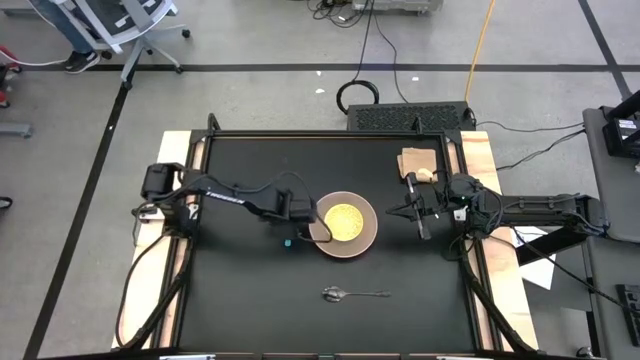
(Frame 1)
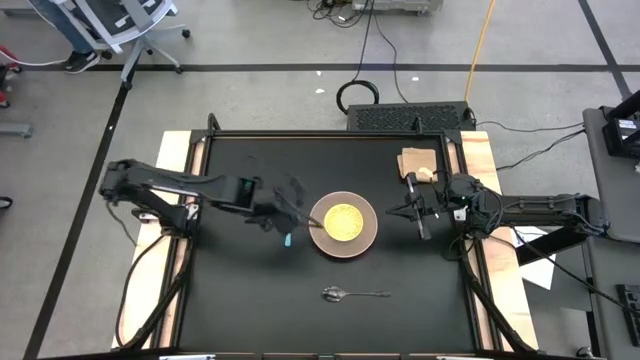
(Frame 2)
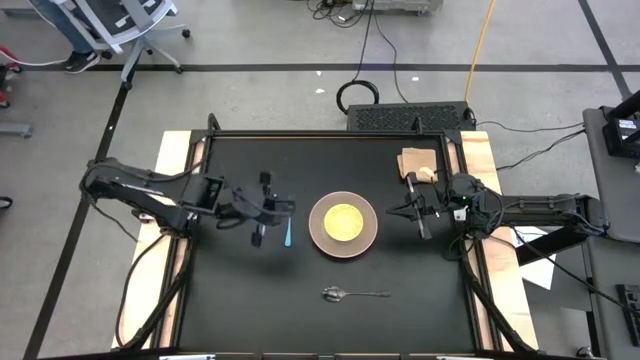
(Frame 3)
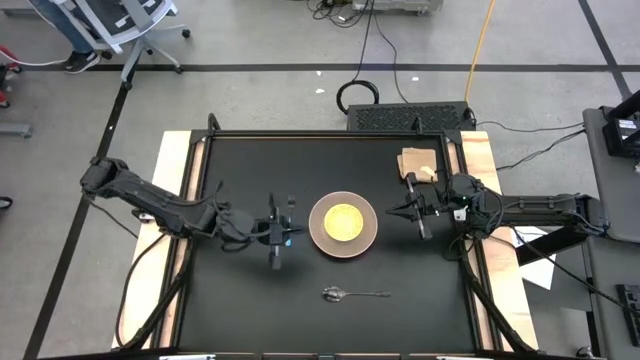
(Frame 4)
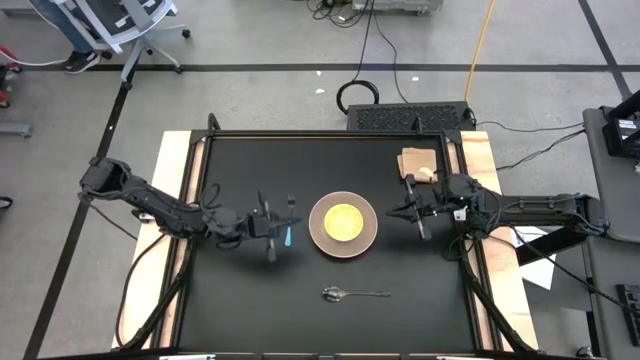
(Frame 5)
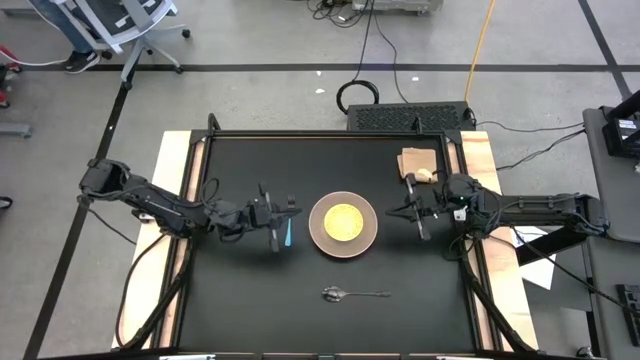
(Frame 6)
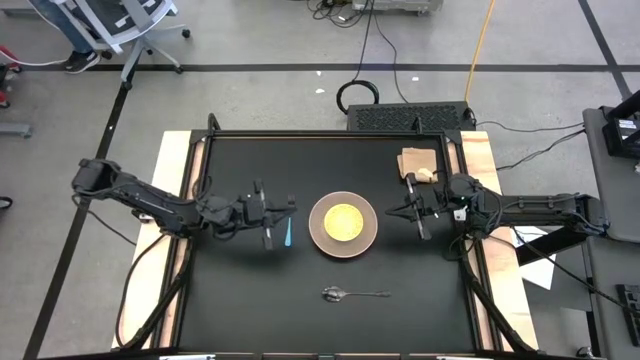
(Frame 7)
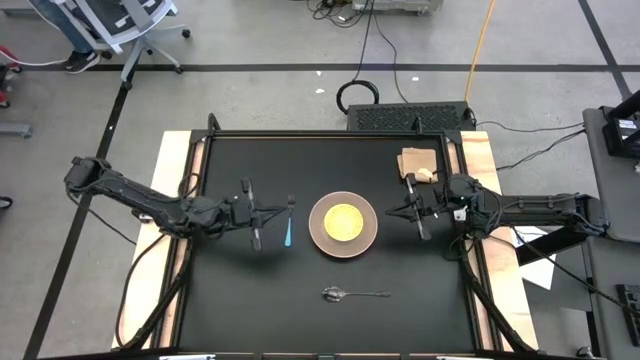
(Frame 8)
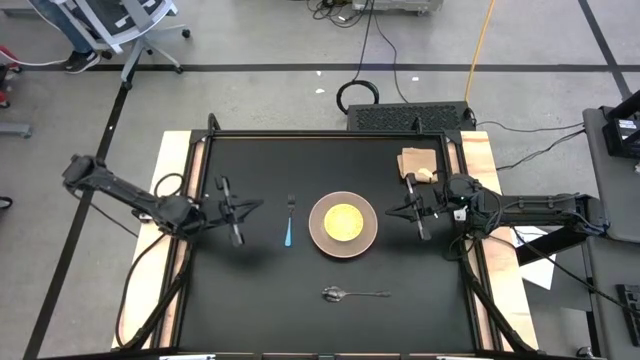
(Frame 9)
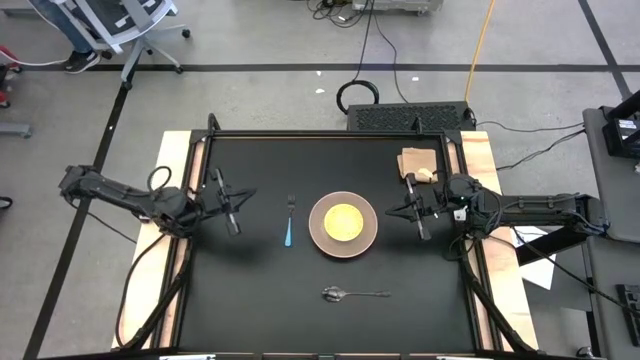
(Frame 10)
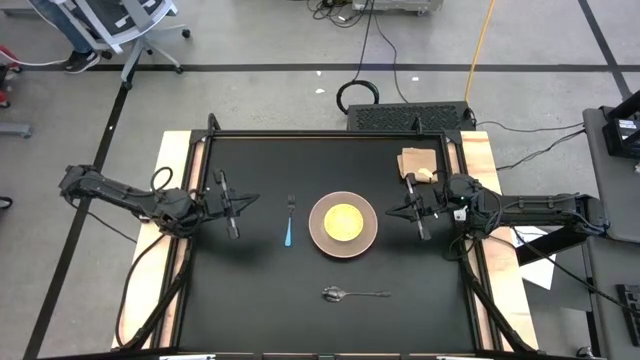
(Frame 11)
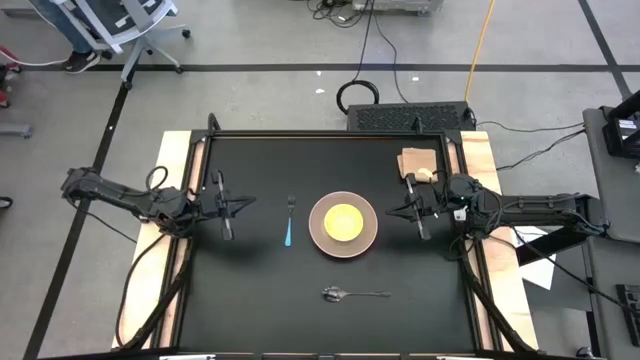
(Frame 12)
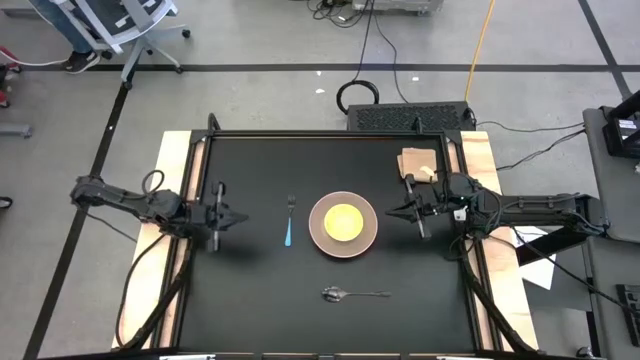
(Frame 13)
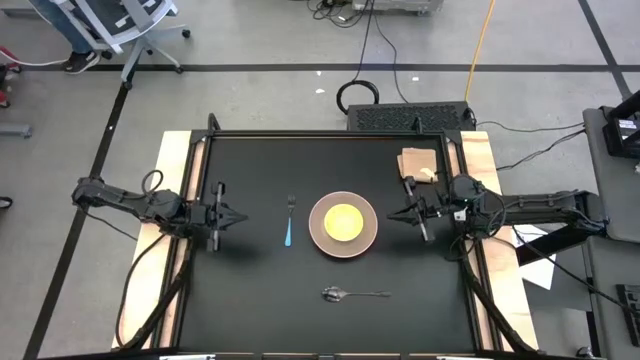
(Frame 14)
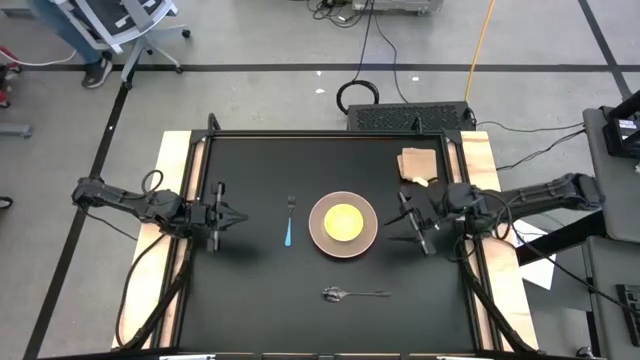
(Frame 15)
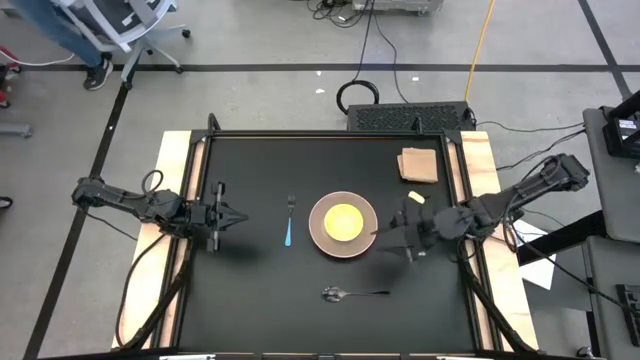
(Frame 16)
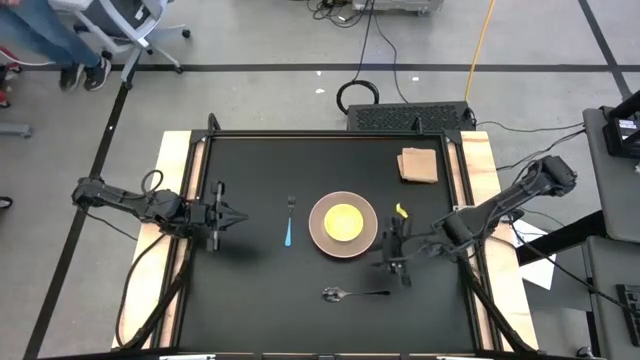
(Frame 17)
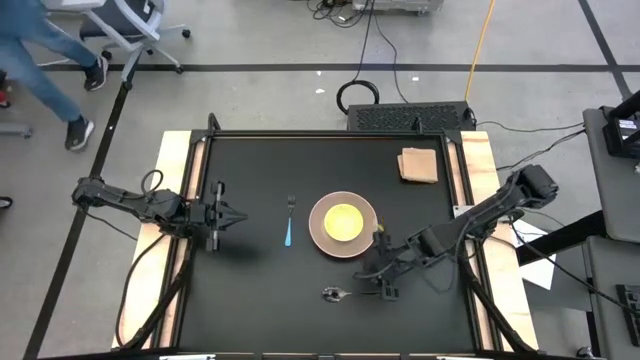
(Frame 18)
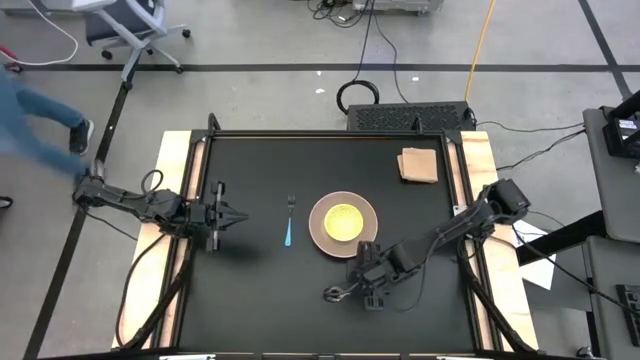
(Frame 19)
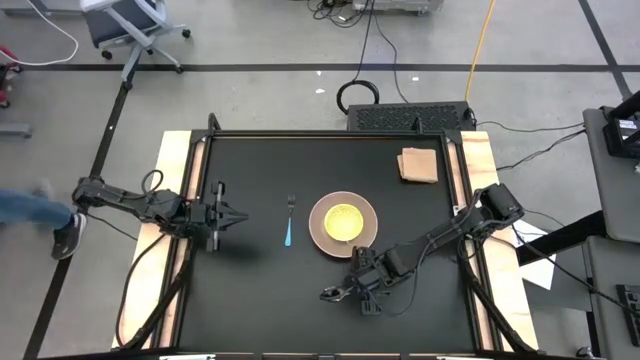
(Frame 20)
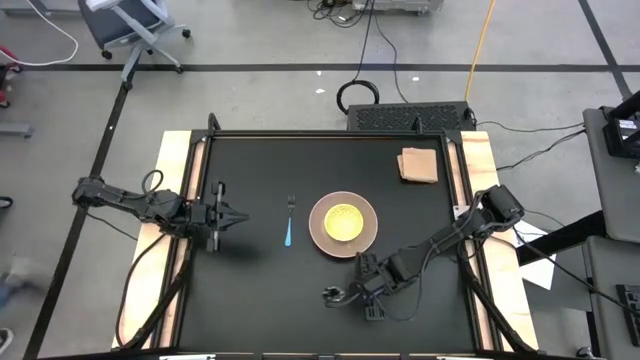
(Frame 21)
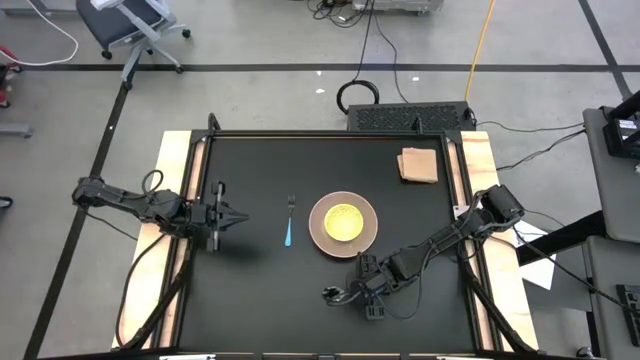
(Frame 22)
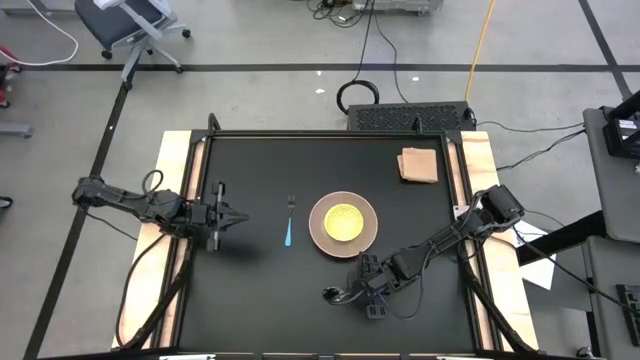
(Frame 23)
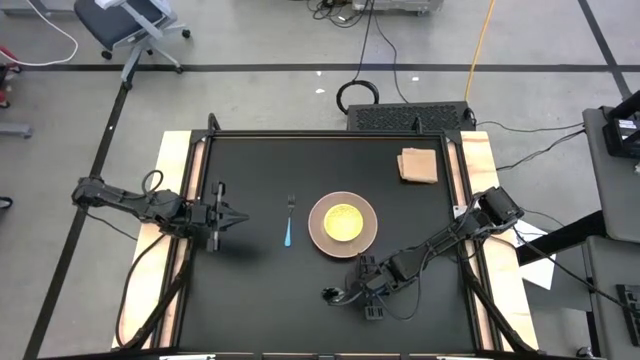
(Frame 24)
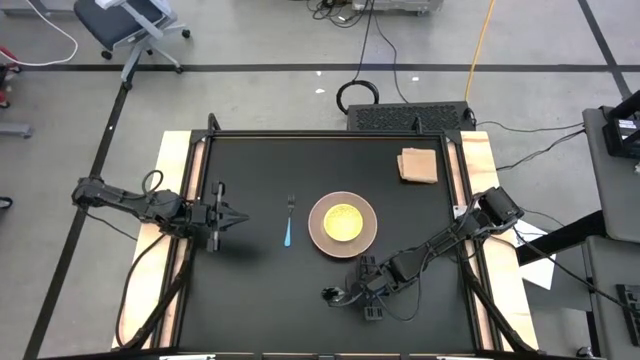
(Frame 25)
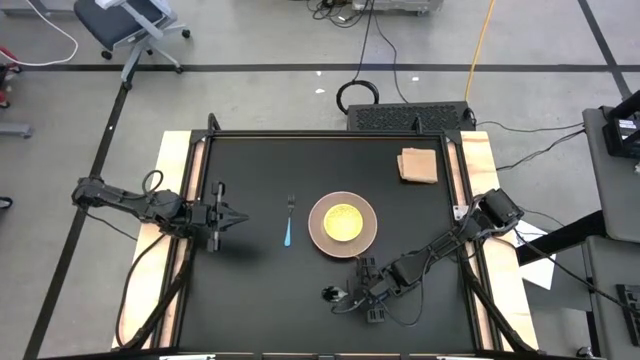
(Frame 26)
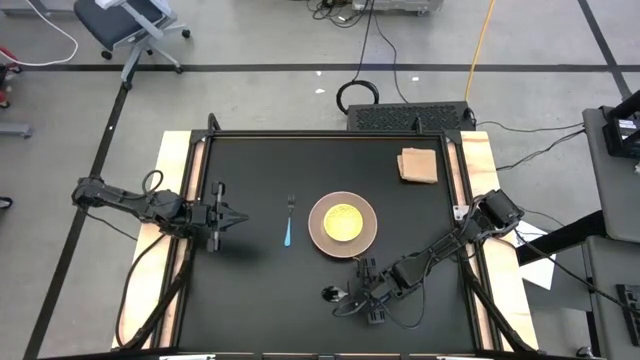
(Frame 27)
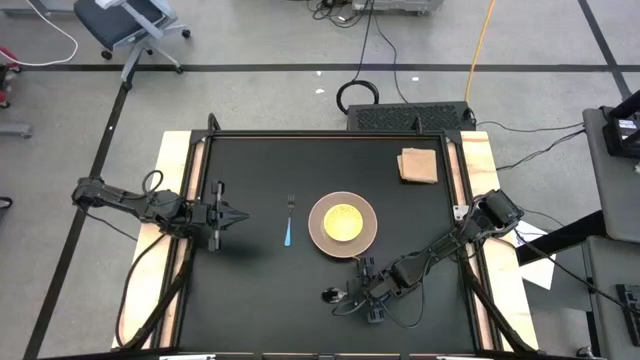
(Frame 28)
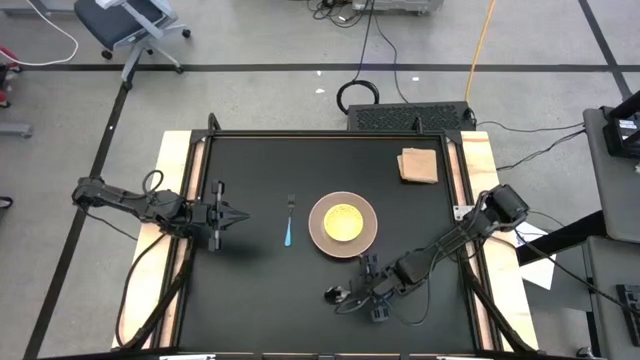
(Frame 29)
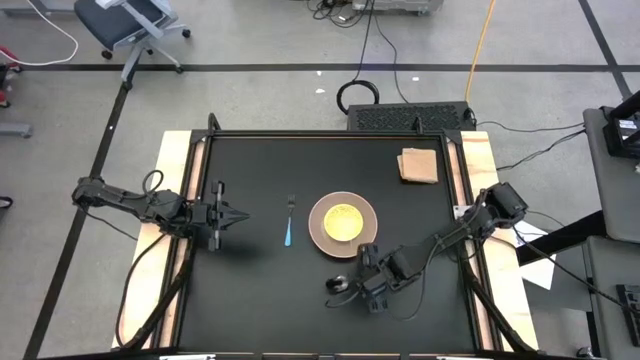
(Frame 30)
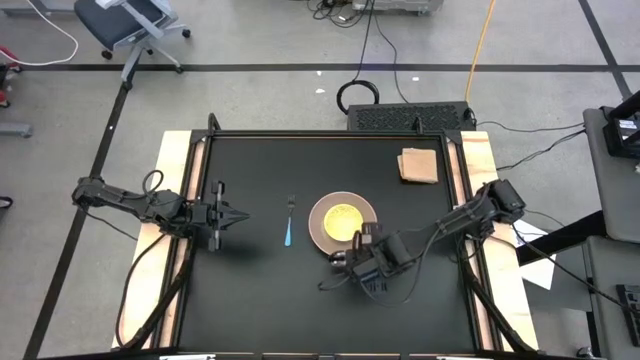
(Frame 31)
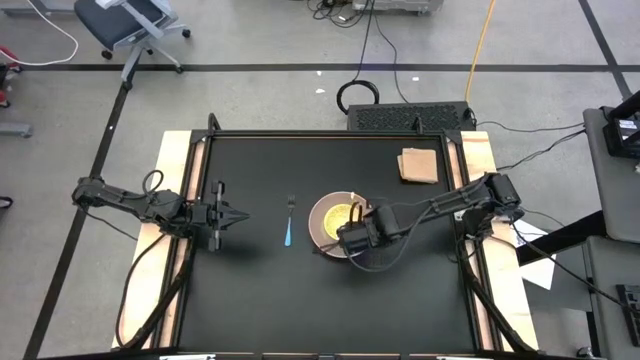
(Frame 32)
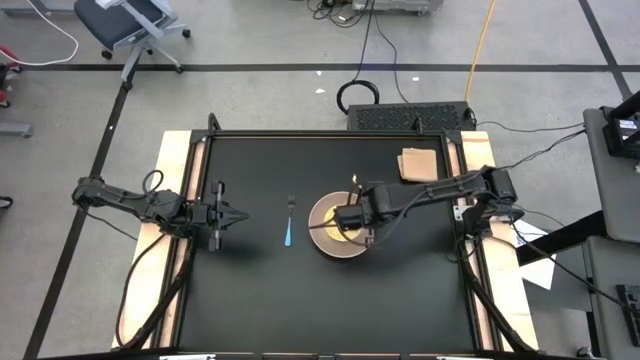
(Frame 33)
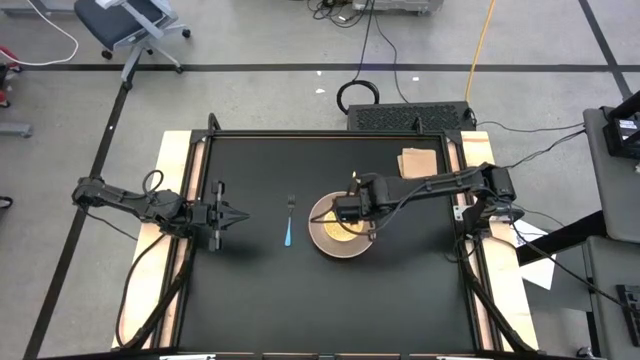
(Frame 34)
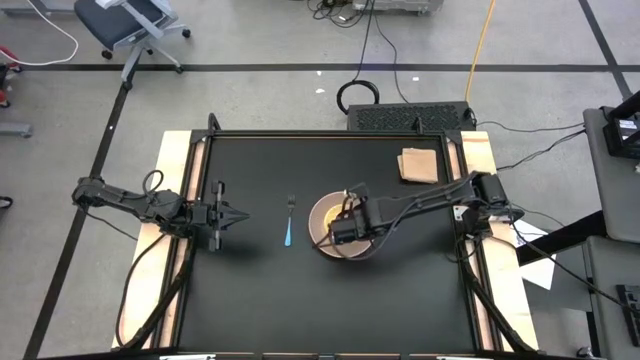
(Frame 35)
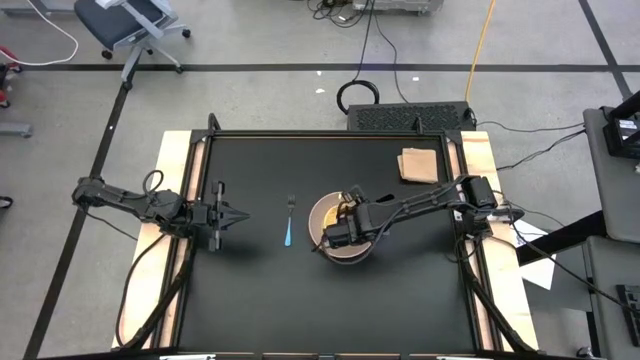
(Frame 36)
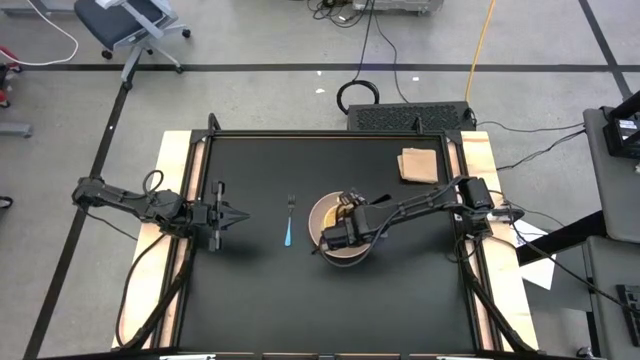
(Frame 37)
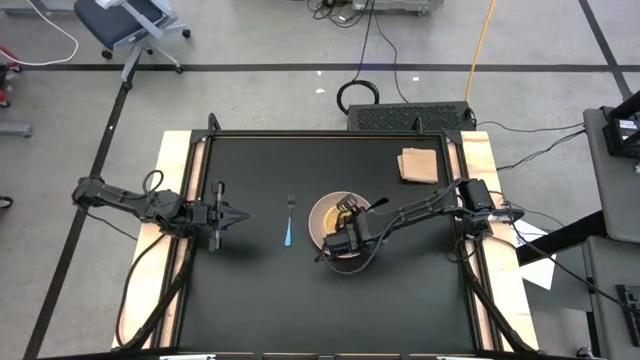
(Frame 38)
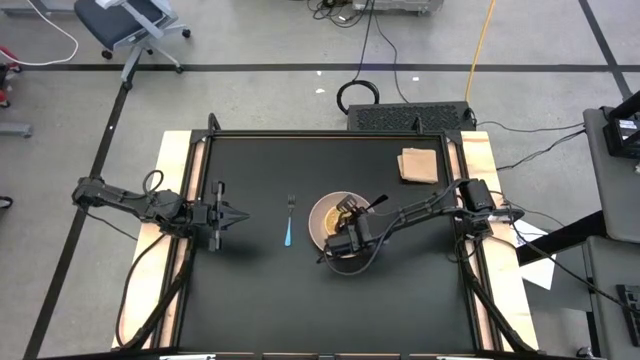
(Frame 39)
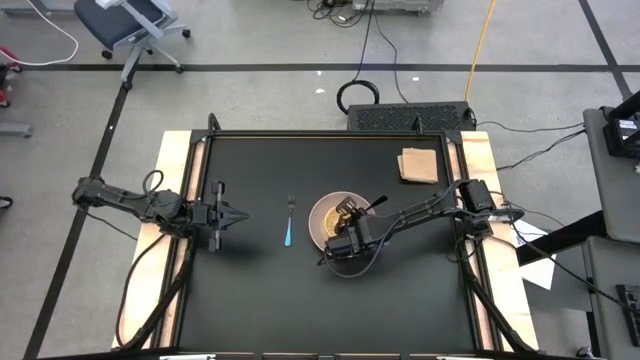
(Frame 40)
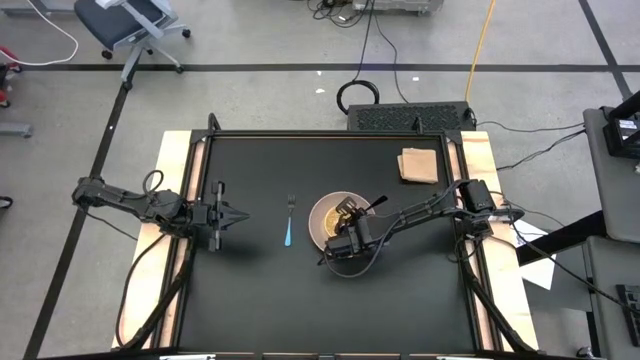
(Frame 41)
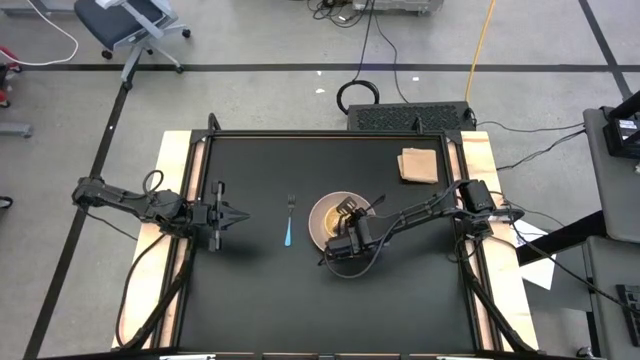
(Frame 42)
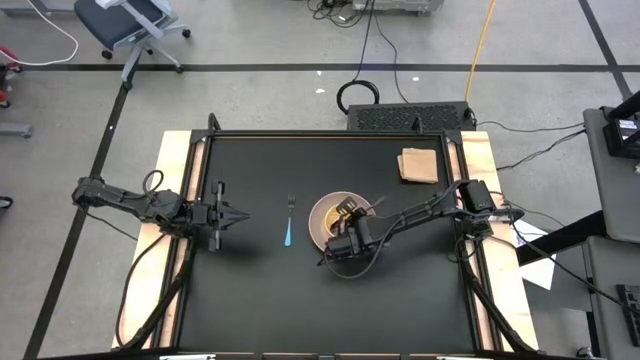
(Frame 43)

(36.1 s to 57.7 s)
Task: Set table place
Put the silver spoon in the yellow bowl
